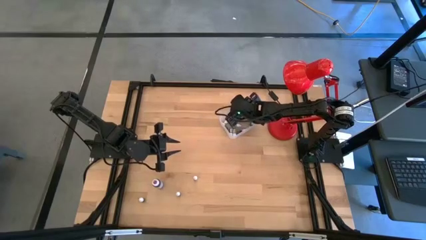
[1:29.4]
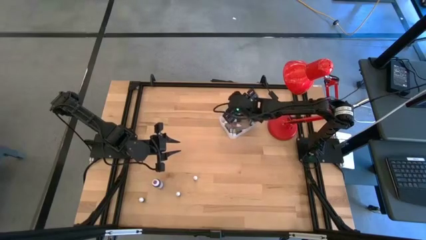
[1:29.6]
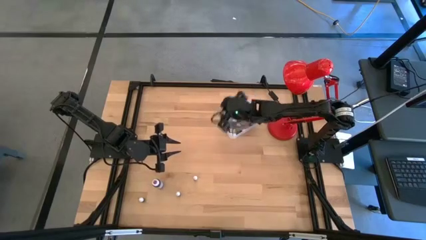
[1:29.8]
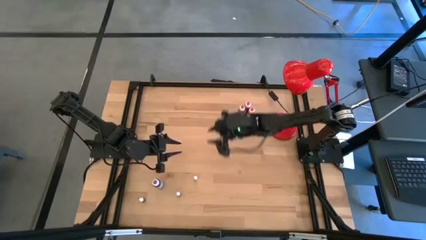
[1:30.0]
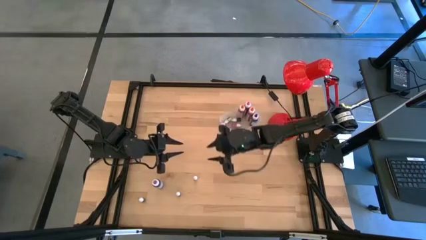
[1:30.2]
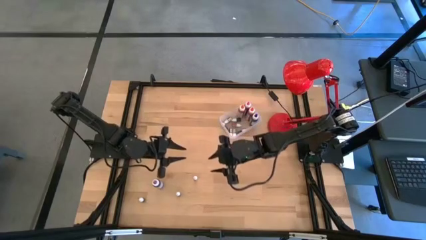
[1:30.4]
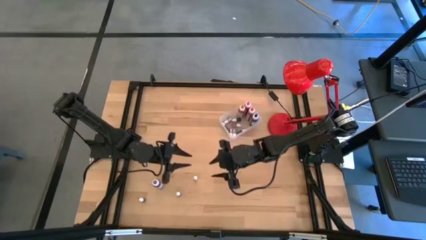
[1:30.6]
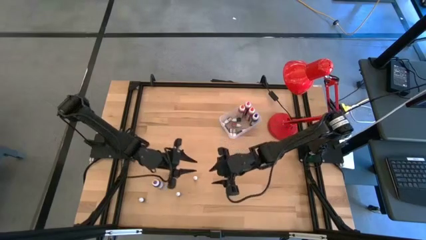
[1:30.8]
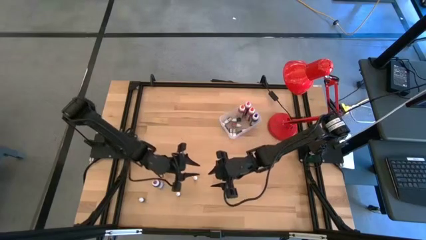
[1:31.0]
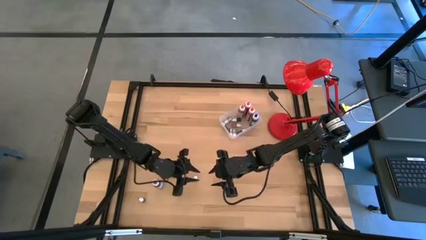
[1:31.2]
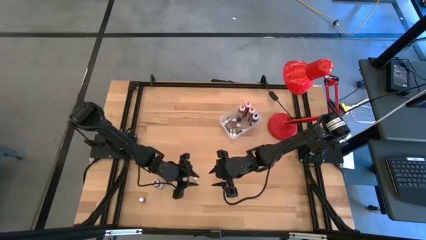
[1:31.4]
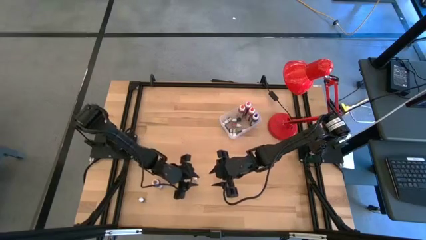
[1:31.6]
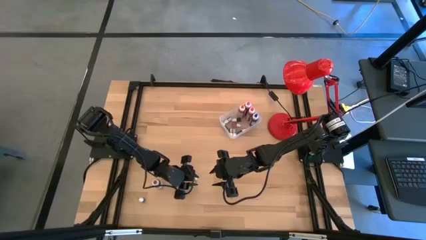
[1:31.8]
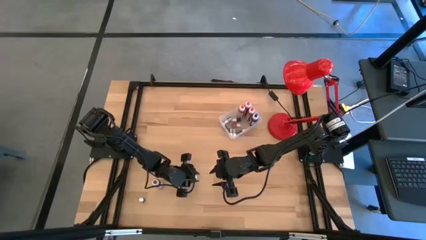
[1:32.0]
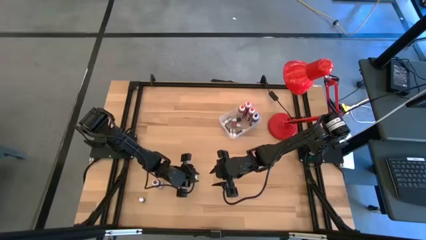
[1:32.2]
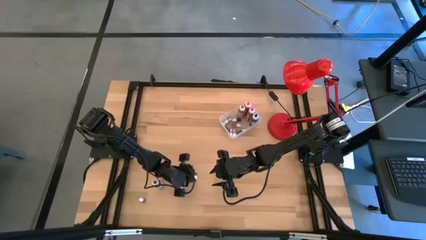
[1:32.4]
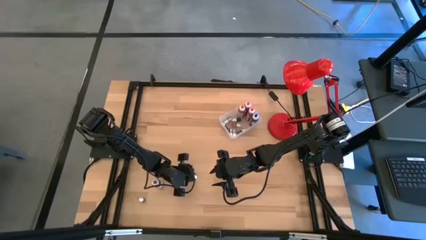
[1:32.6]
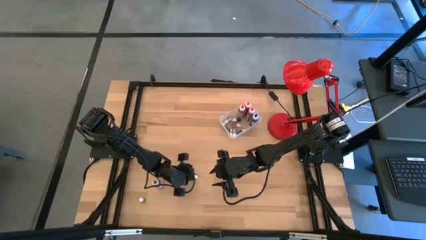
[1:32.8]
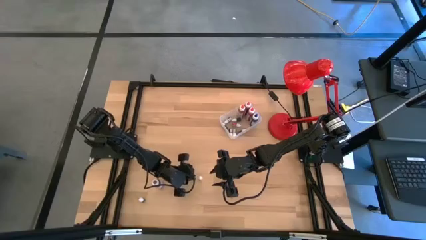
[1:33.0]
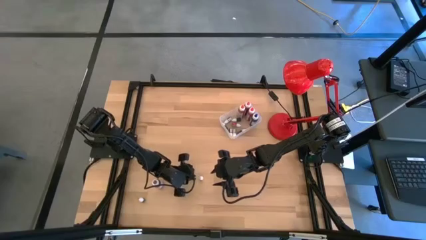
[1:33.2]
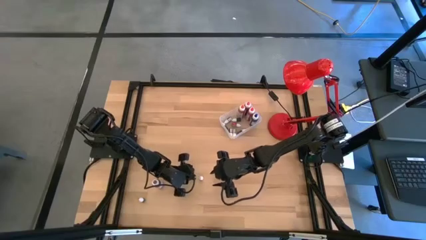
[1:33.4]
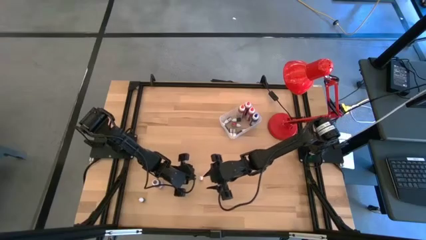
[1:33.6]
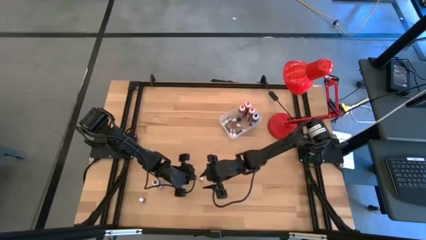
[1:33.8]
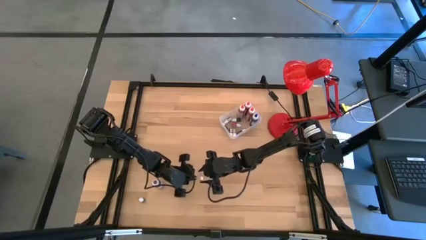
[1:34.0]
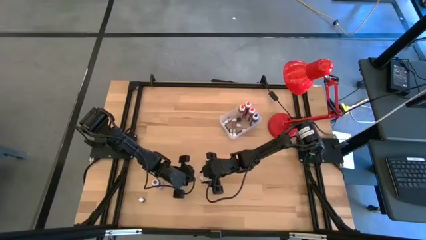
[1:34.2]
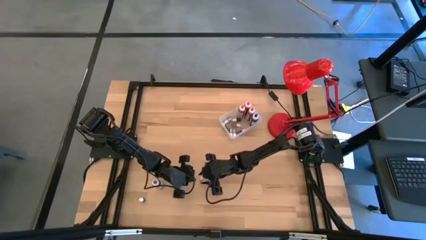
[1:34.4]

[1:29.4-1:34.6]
Task: Pick & Place food coloring
Put the small red food coloring bottle in the transparent bin

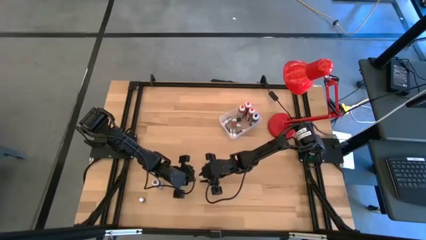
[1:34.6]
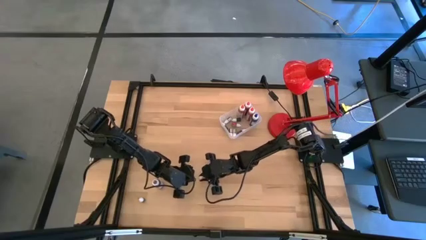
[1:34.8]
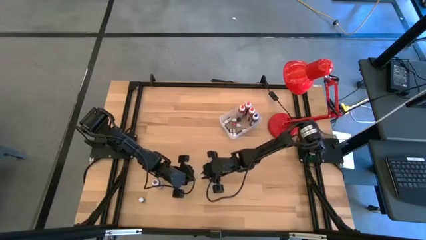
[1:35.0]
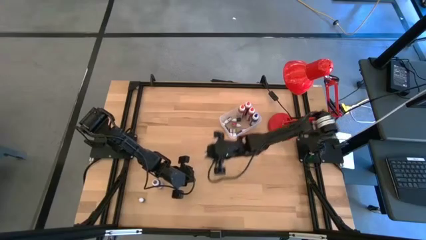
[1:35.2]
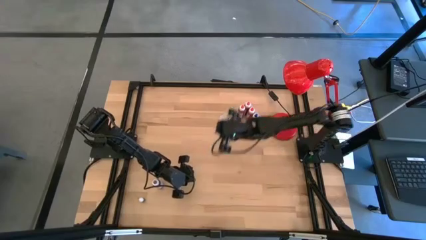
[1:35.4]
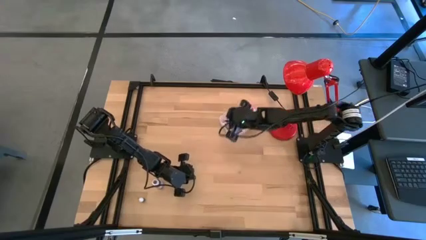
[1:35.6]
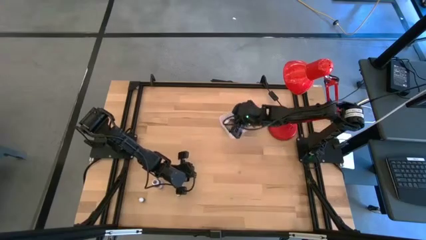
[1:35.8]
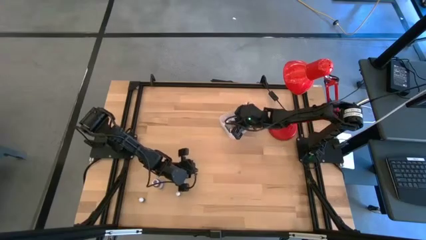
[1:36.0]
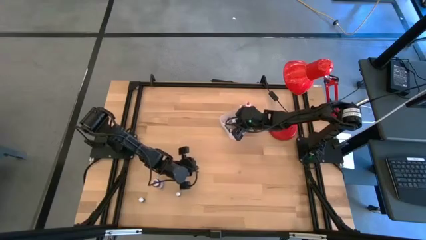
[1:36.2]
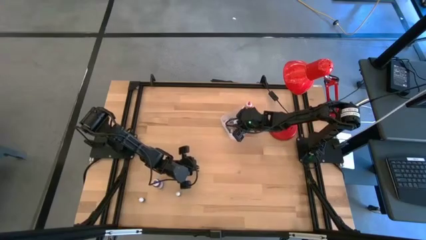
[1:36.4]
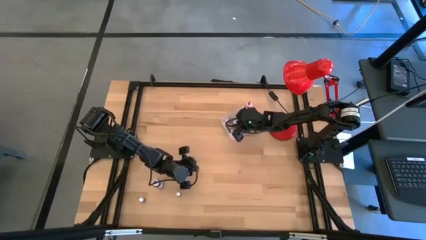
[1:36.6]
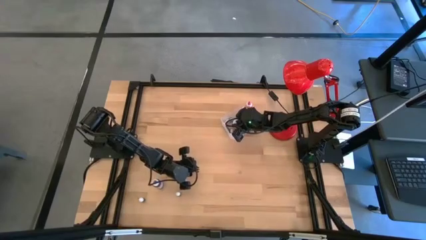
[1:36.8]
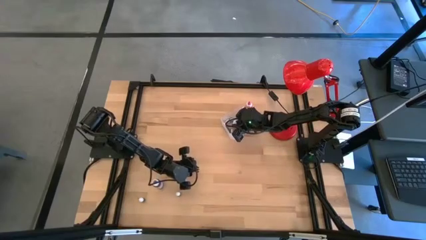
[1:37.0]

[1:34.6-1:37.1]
Put the small red food coloring bottle in the transparent bin

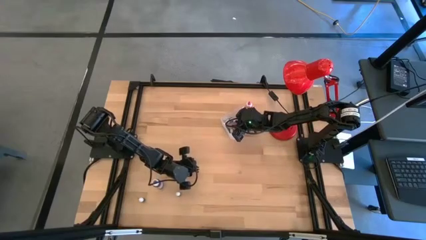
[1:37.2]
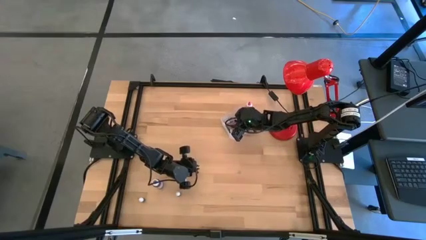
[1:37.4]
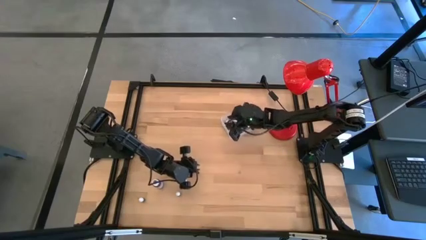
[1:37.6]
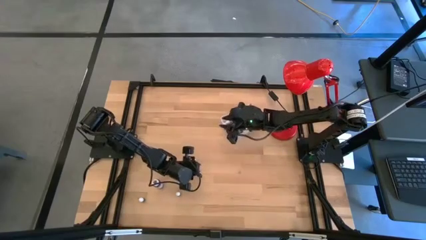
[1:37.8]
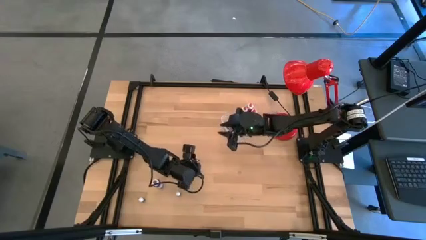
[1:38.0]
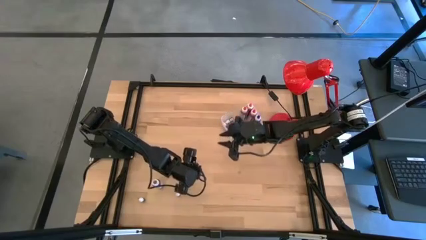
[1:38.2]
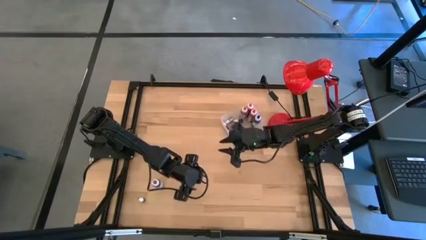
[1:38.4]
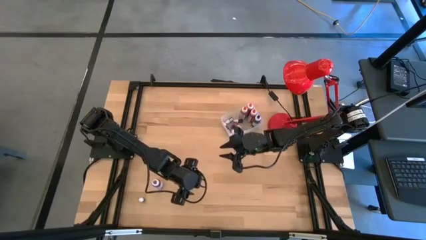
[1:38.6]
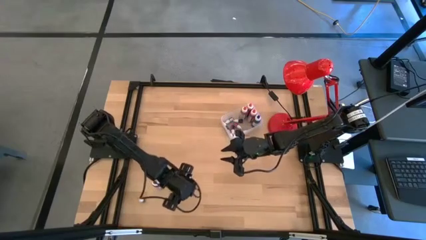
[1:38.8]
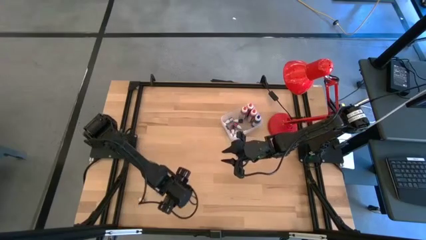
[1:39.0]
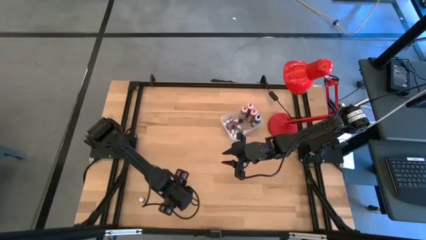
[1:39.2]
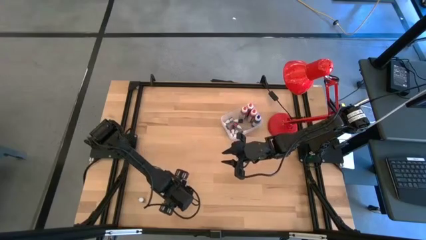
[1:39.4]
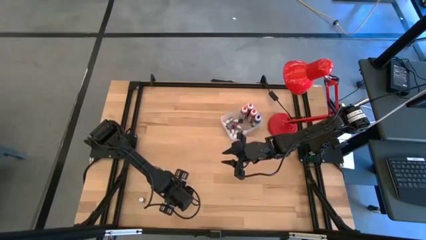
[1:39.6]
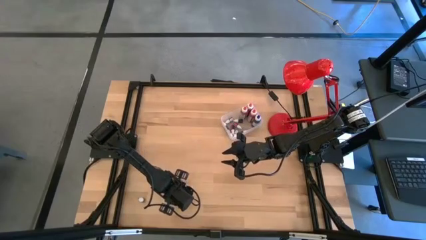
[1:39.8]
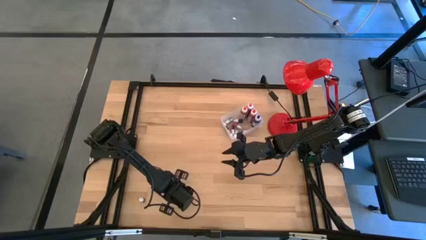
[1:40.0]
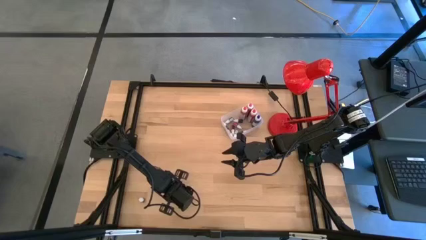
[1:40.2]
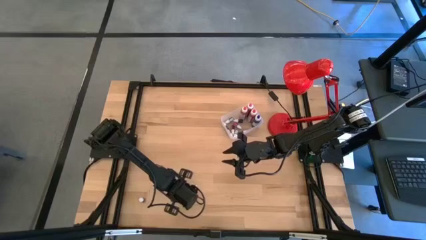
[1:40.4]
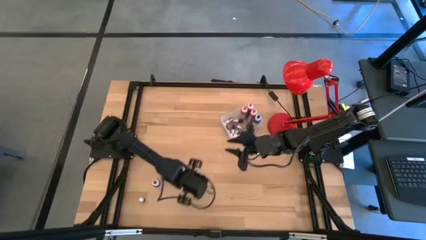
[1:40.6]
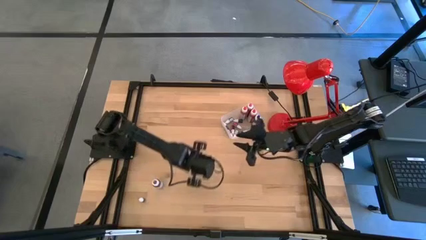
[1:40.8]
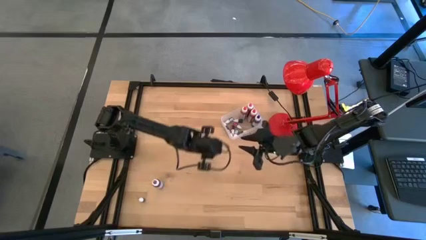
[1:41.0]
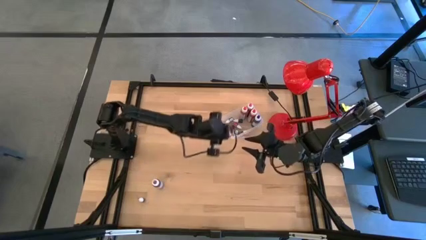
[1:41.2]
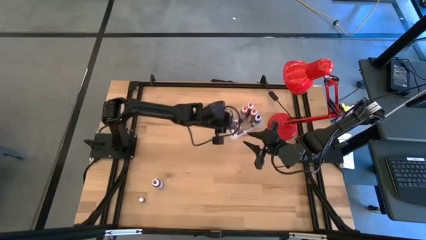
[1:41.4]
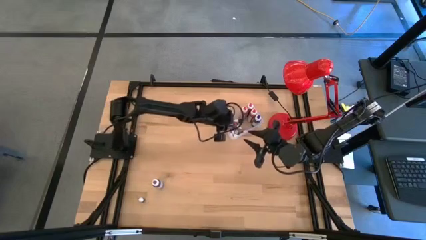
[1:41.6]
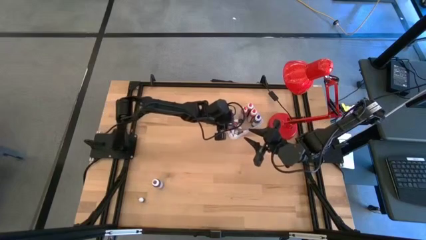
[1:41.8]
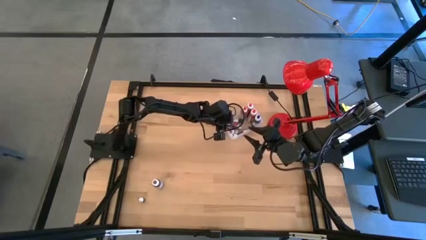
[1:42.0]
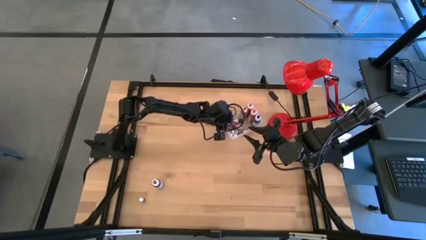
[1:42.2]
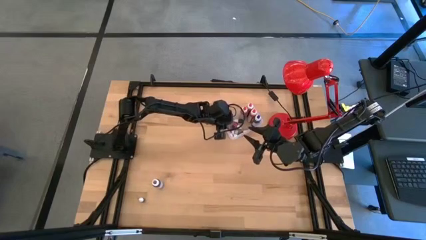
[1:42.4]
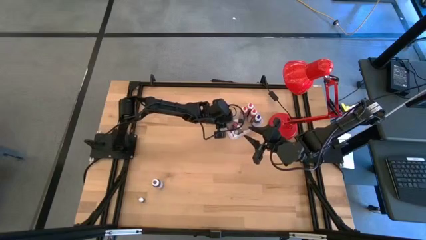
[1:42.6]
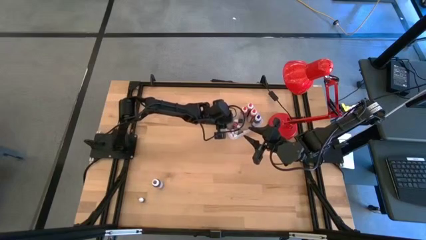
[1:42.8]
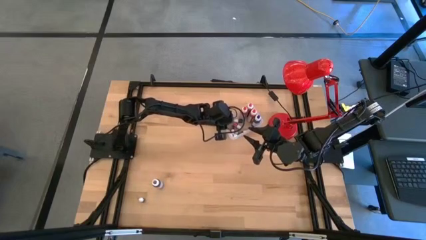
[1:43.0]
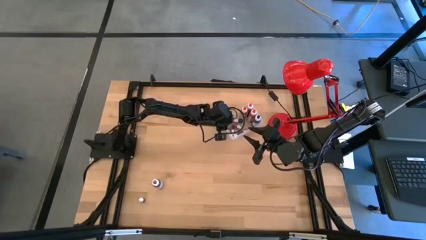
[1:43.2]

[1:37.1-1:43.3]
Put the small red food coloring bottle in the transparent bin

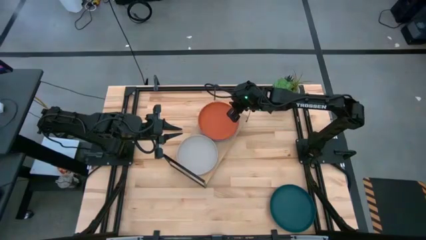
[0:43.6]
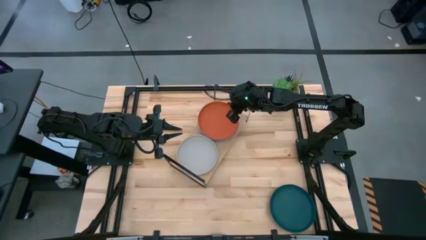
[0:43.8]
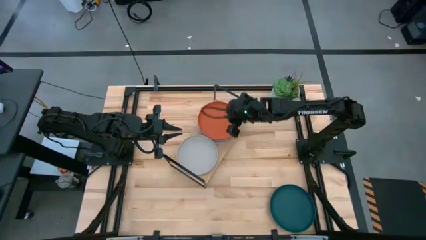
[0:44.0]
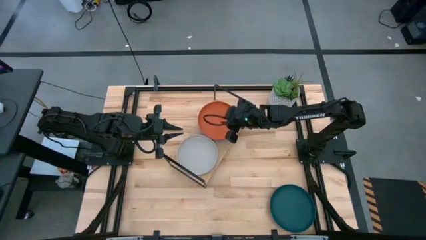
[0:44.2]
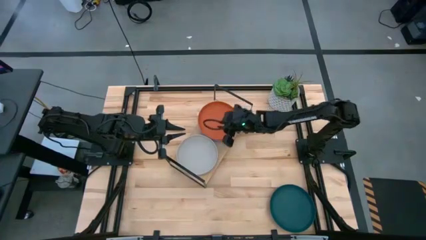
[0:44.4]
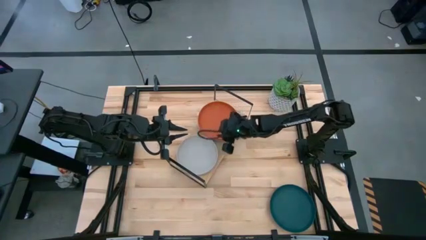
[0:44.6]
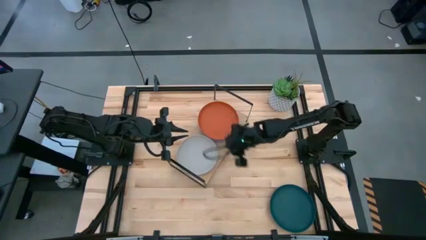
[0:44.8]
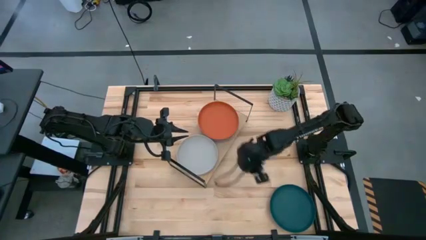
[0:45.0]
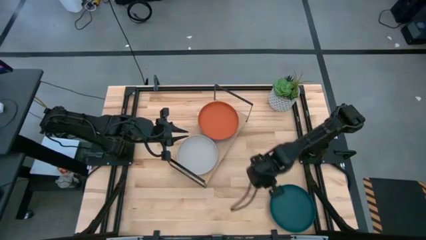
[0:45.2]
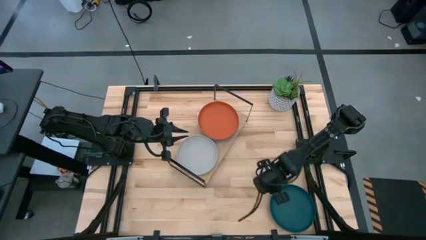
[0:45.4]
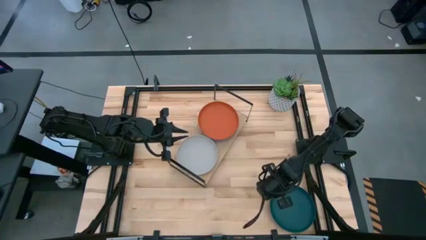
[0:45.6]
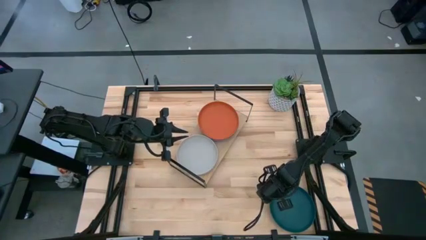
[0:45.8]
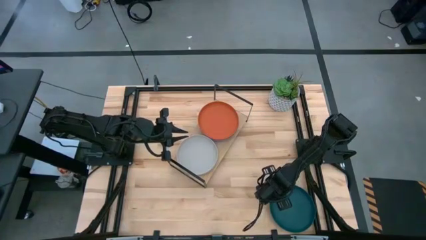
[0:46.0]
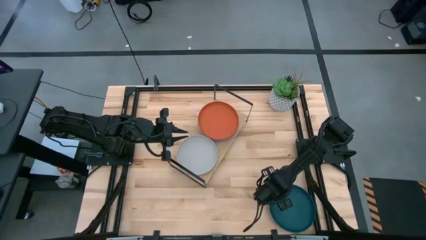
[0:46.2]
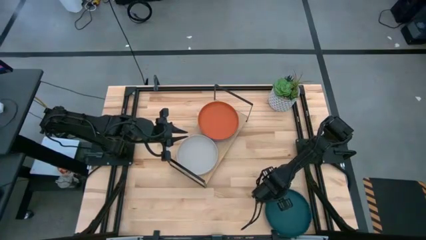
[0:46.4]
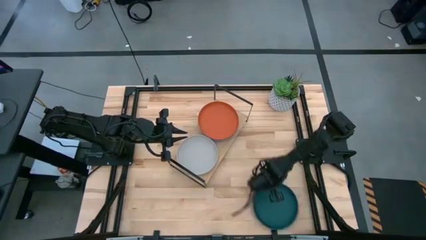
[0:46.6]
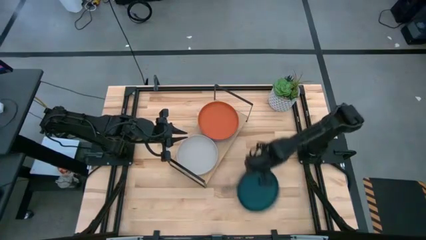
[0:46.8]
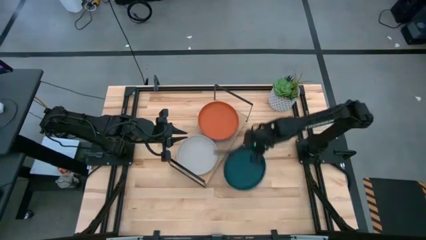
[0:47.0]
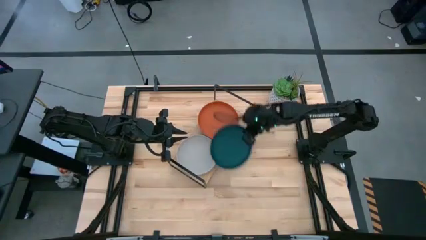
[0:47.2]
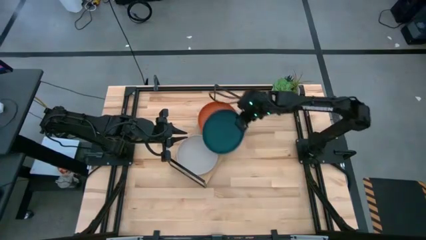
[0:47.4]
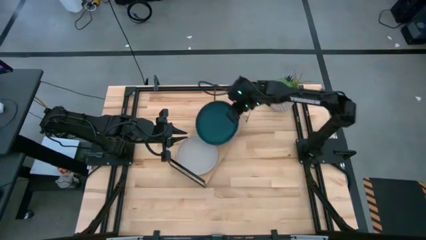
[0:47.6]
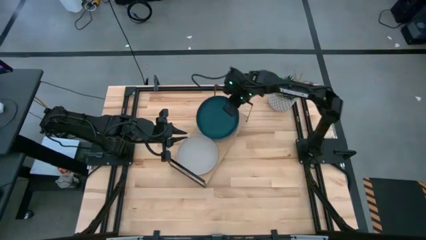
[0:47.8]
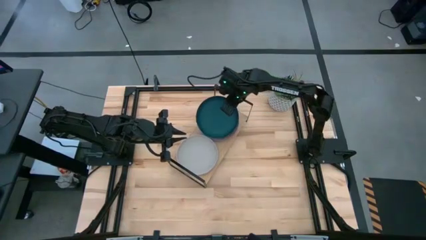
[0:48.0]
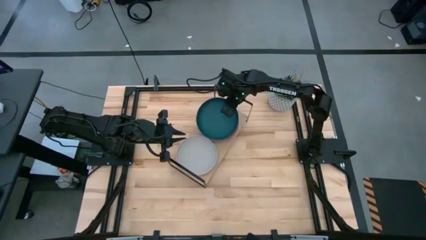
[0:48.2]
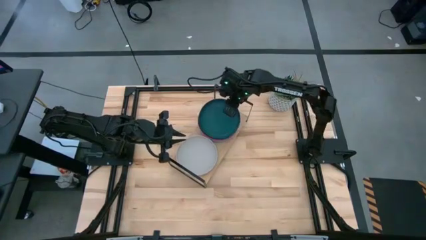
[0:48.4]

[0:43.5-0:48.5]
Task: Place and stack plates onto a shelf
Stack the dark blue plate on top of the orange plate on the shelf
